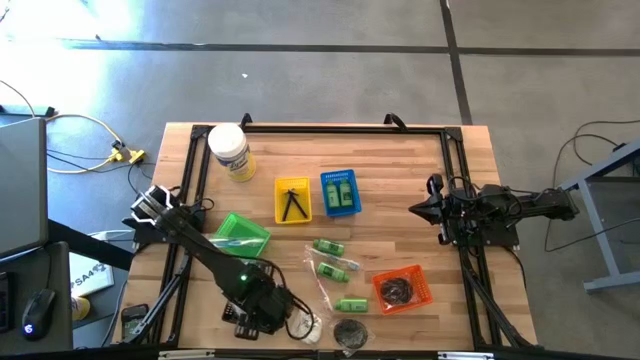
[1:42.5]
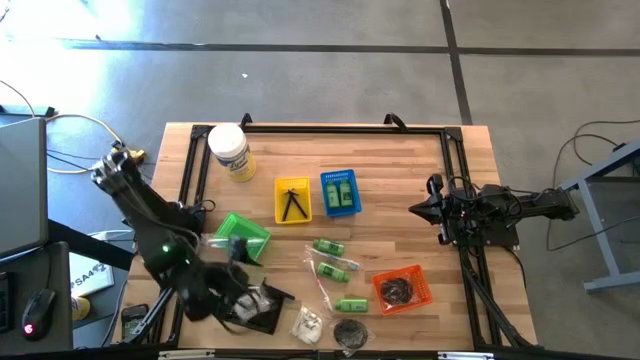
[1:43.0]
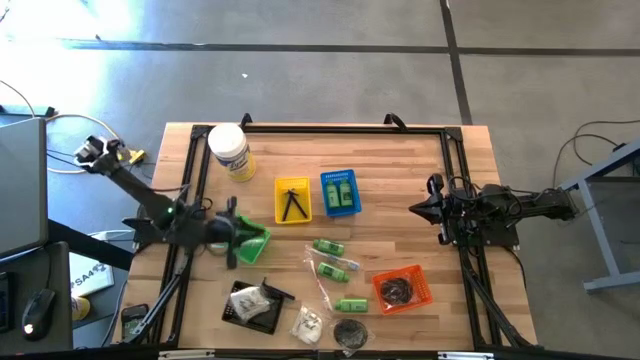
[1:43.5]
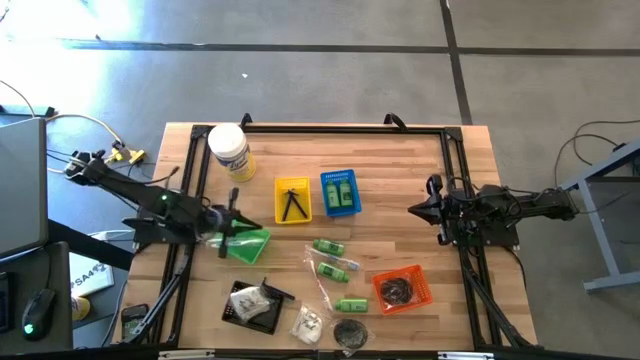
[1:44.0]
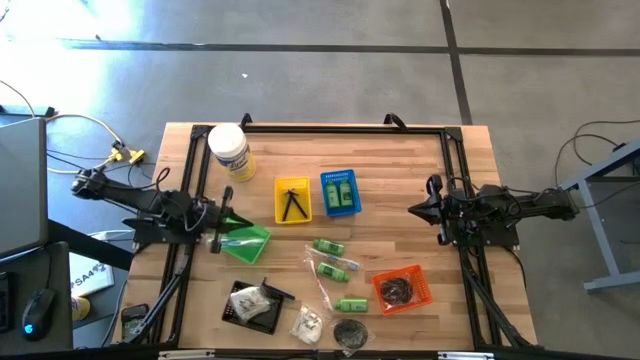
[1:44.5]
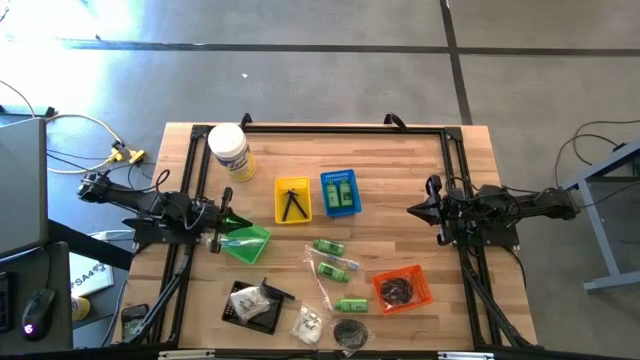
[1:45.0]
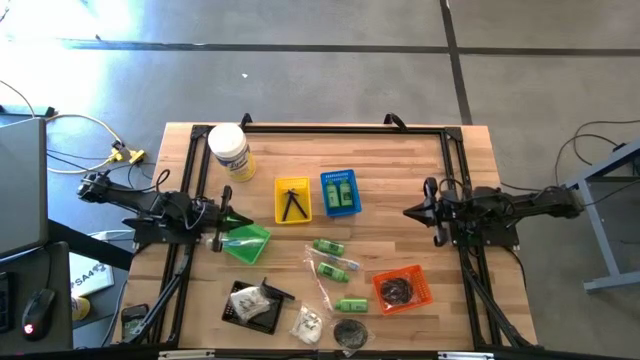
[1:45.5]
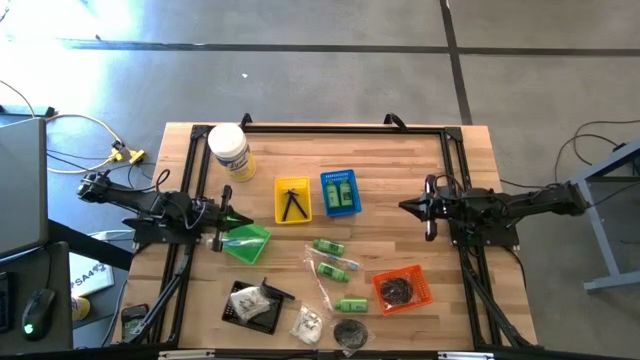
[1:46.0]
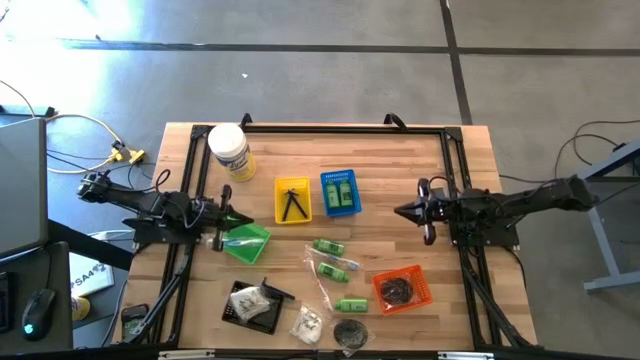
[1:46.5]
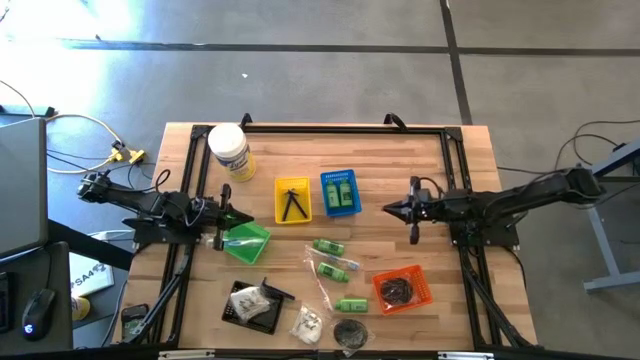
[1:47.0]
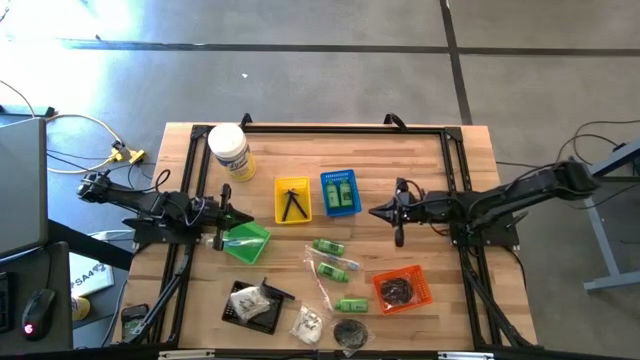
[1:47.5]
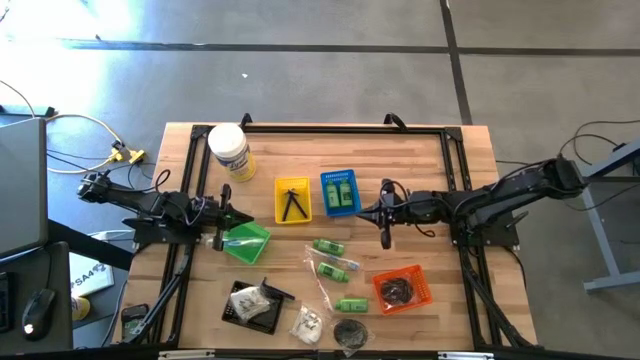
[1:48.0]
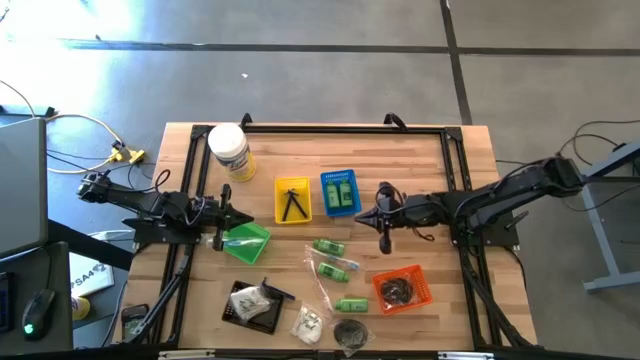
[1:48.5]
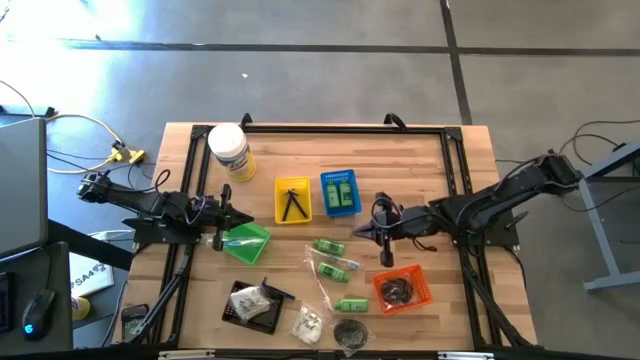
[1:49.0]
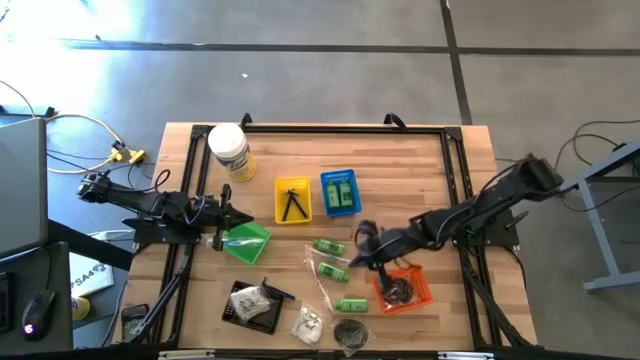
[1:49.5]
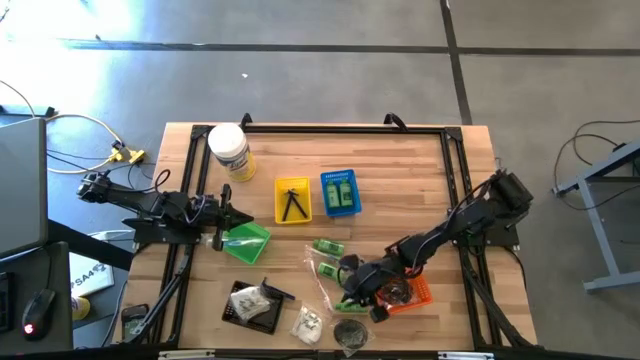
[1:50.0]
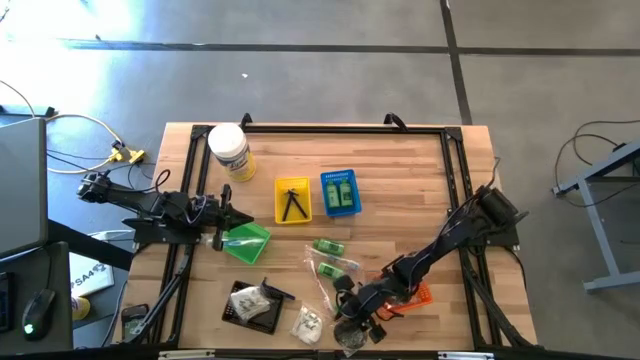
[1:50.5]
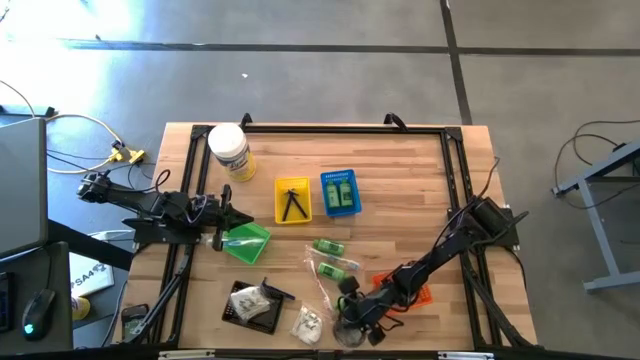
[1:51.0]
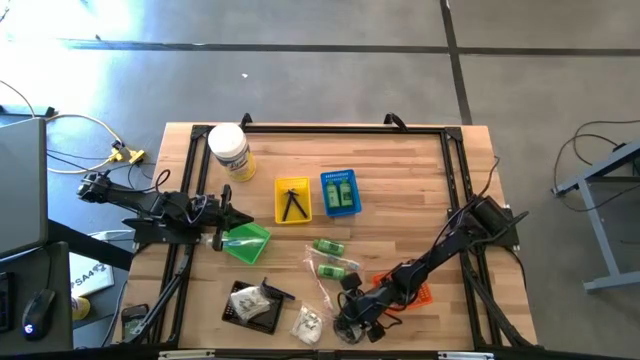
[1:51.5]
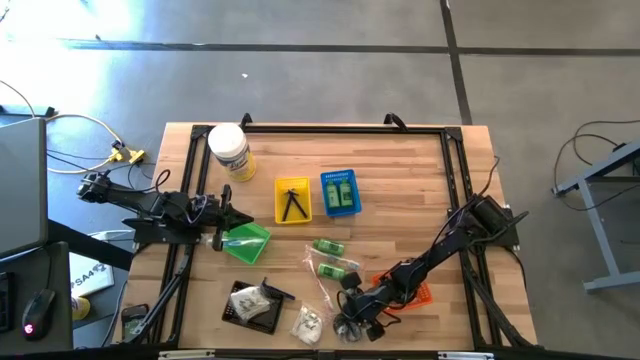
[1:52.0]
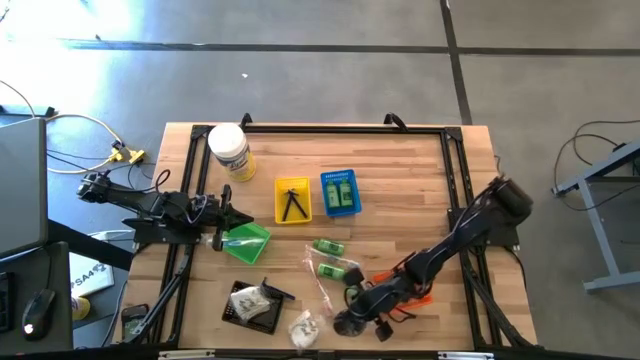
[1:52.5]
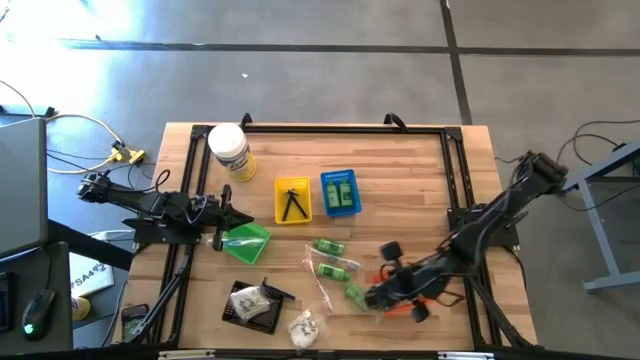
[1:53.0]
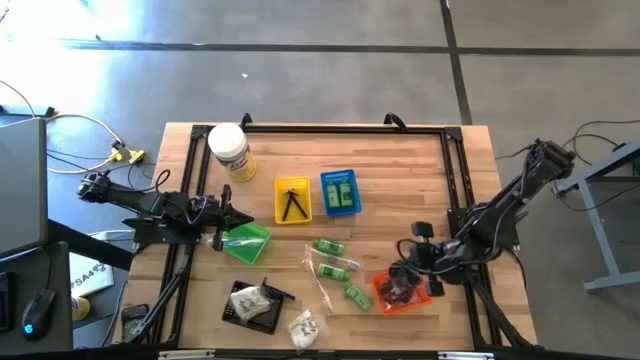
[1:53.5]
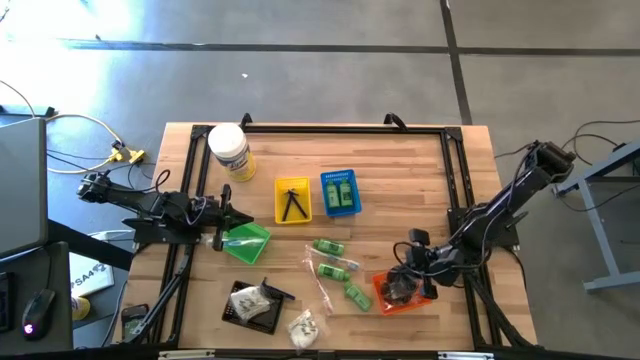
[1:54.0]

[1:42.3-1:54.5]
Task: Pick & Place Travel size toiletries
Put the hairbrush into the orange bin

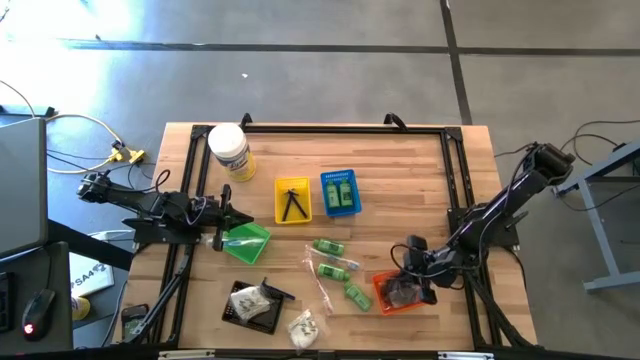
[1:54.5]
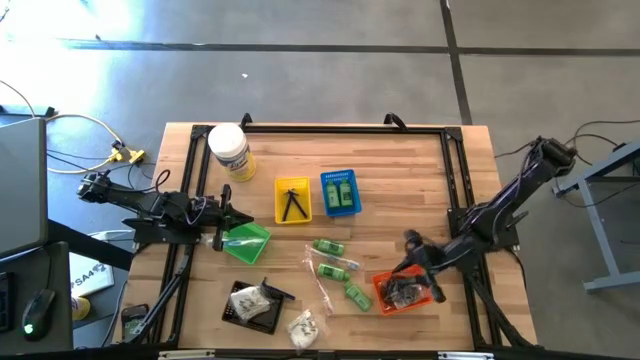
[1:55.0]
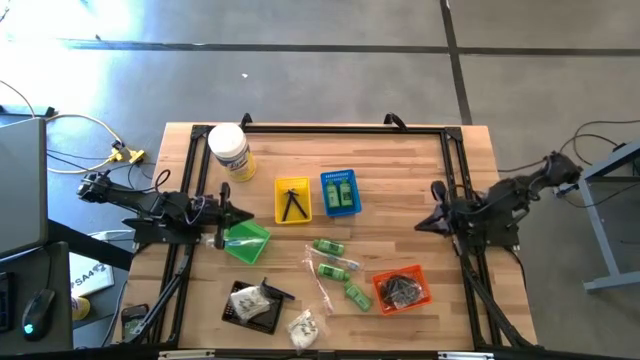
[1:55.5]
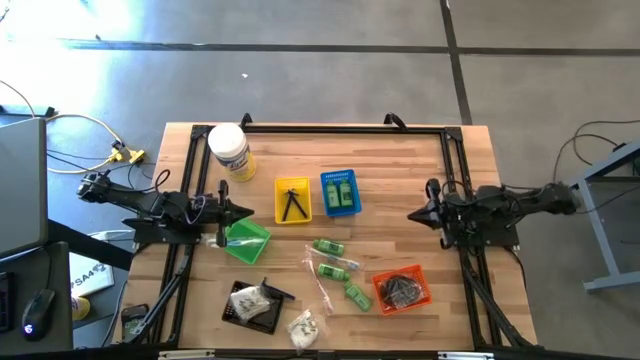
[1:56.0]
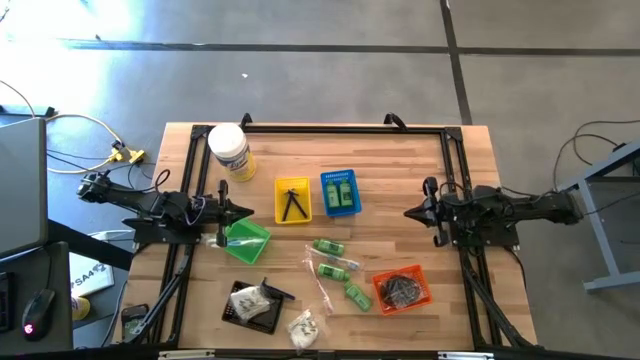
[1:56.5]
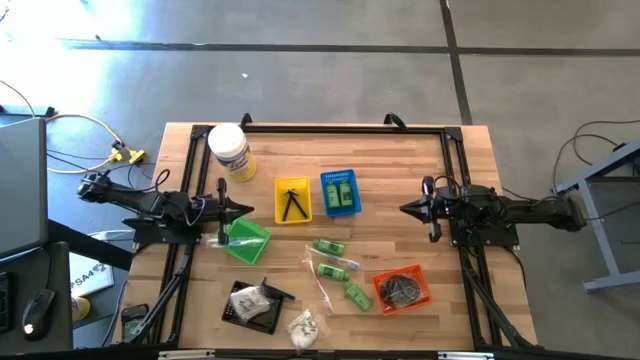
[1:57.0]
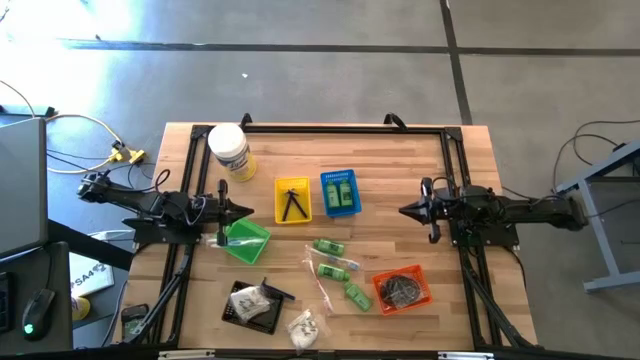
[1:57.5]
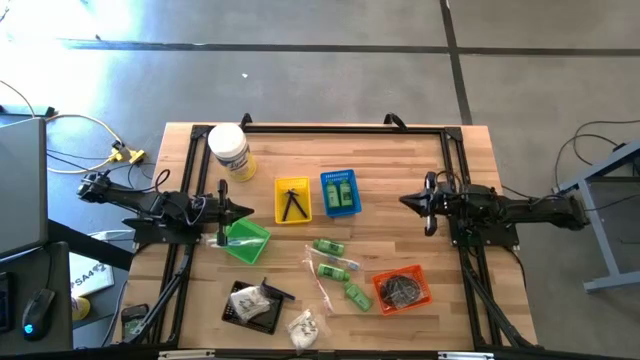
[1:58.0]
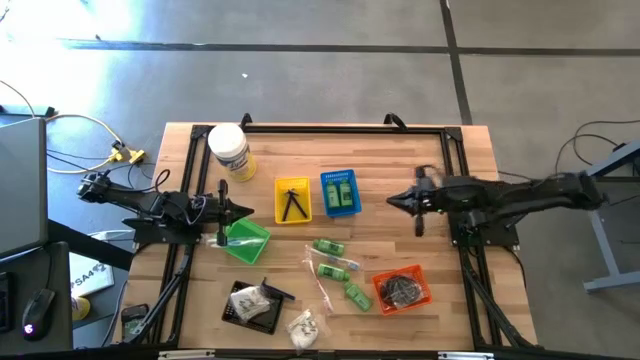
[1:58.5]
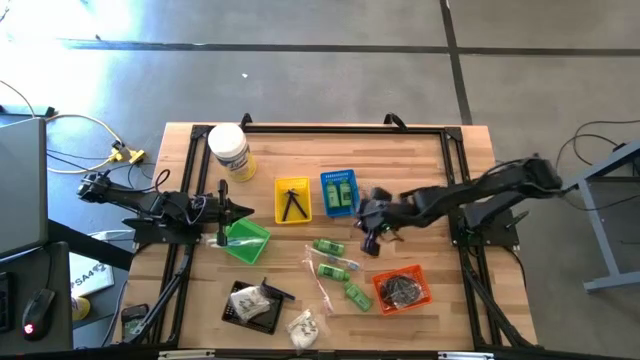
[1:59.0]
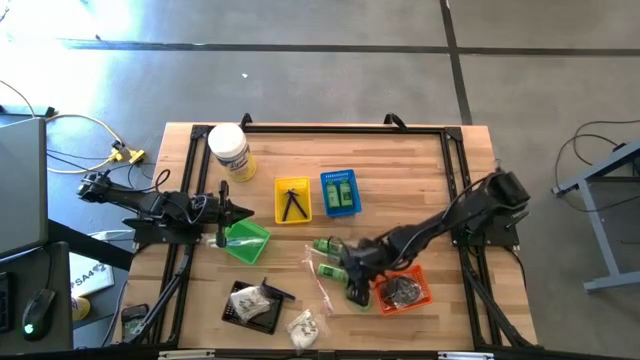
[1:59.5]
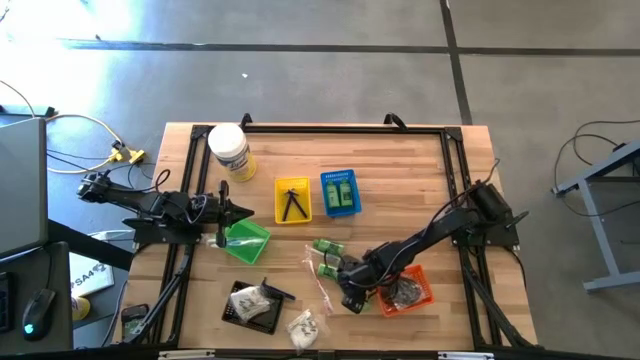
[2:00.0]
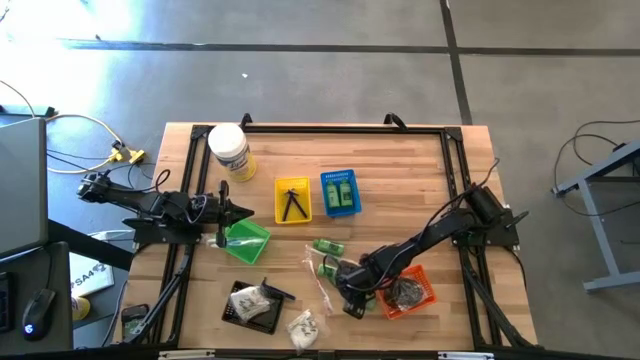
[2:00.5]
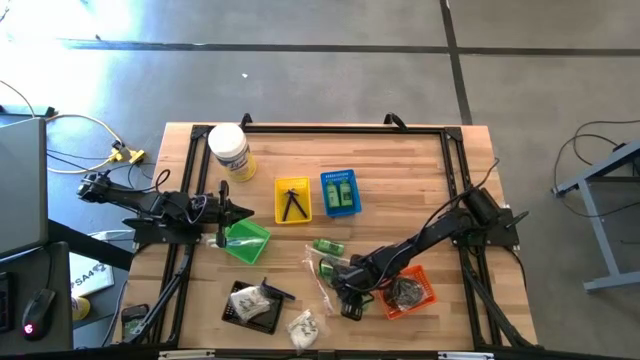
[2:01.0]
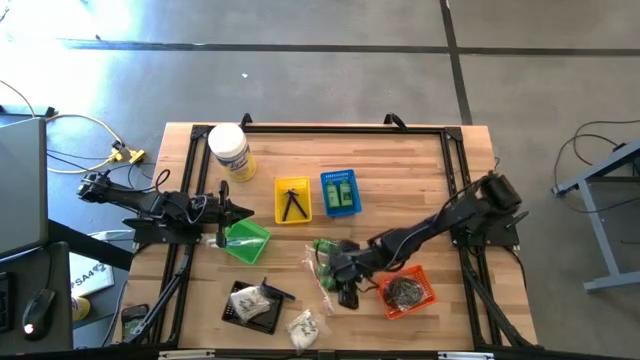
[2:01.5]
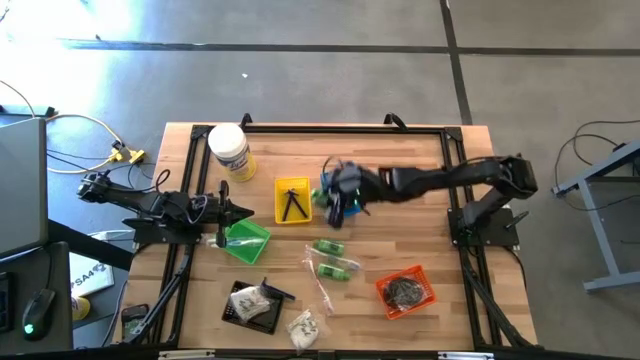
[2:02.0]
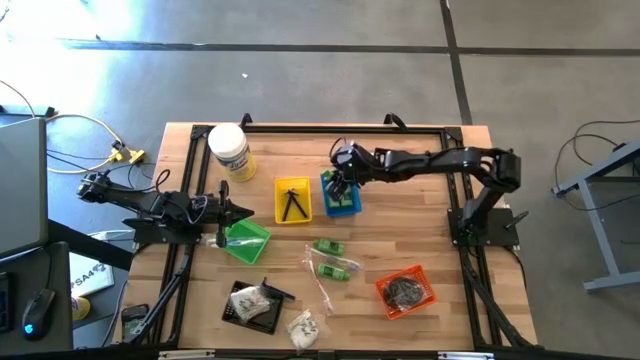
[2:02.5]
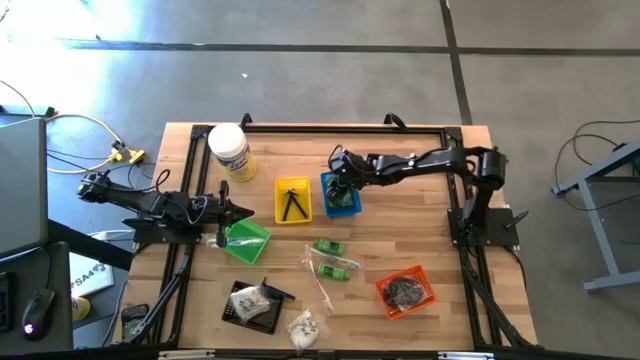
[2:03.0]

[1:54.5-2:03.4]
Put the shampoo into the blue bin

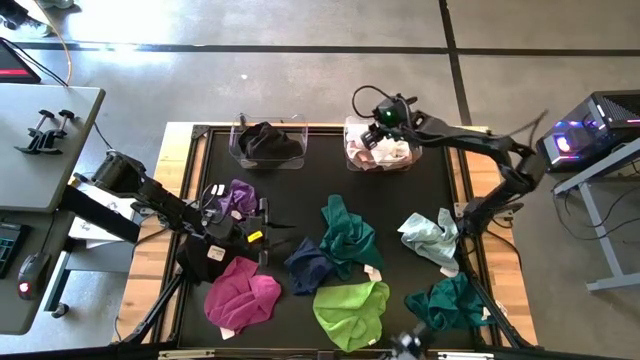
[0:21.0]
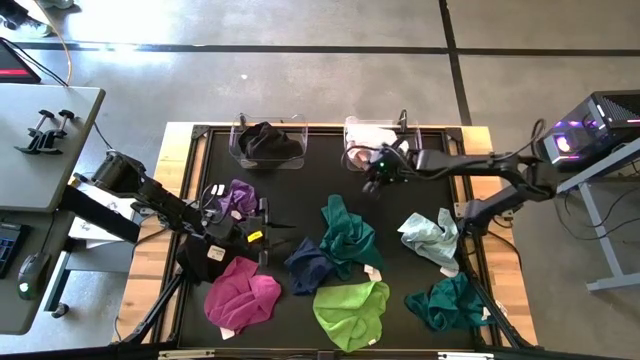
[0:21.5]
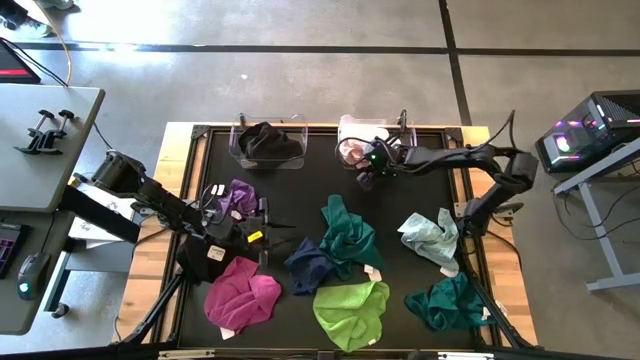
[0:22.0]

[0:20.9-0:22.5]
Task: Sort towels by color in basket
Adjust the transparent bin
